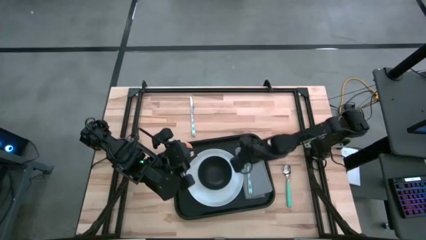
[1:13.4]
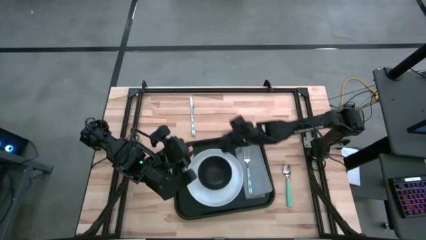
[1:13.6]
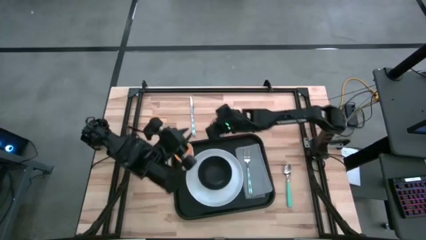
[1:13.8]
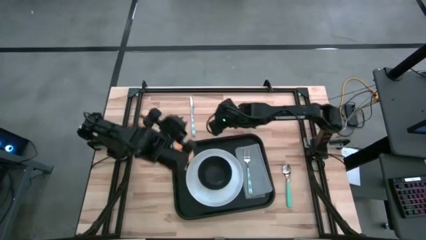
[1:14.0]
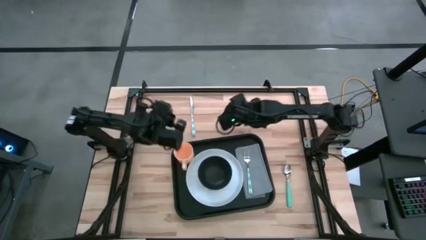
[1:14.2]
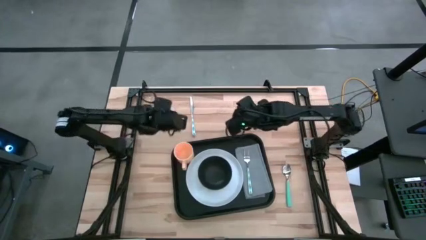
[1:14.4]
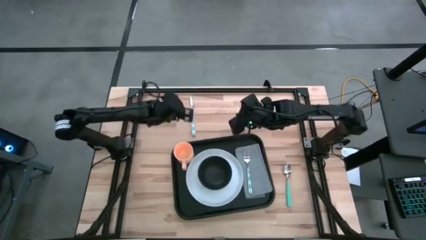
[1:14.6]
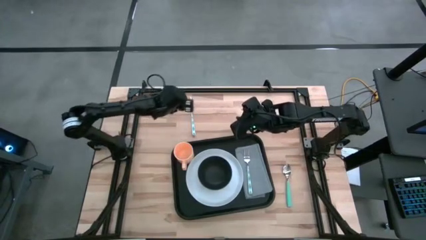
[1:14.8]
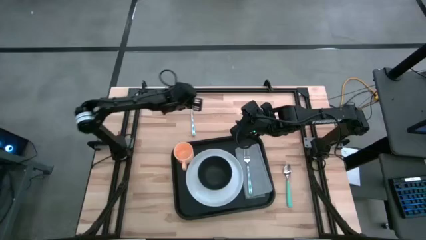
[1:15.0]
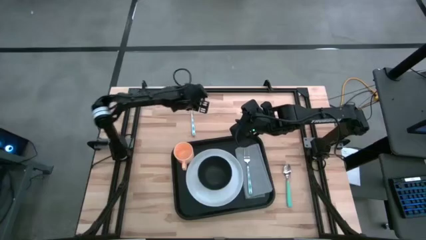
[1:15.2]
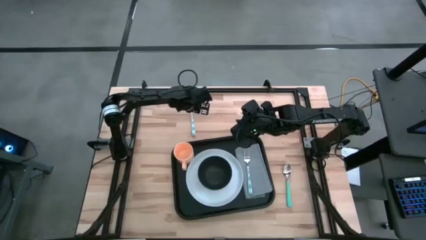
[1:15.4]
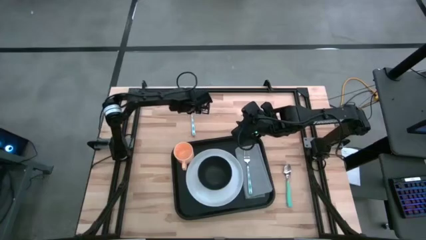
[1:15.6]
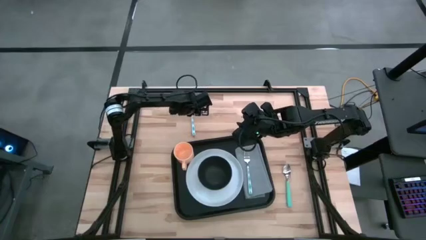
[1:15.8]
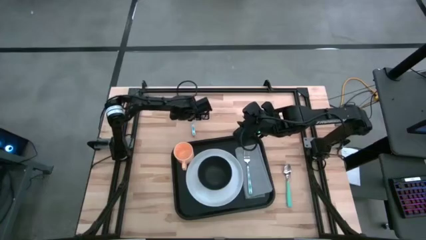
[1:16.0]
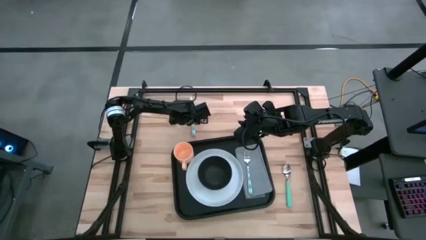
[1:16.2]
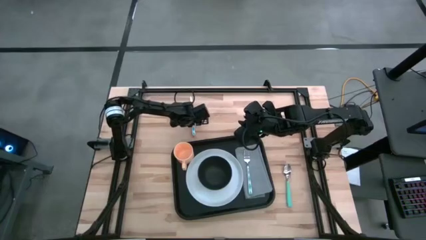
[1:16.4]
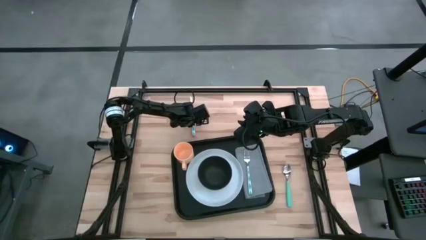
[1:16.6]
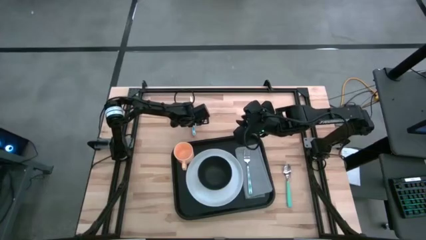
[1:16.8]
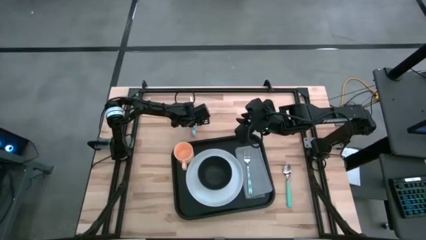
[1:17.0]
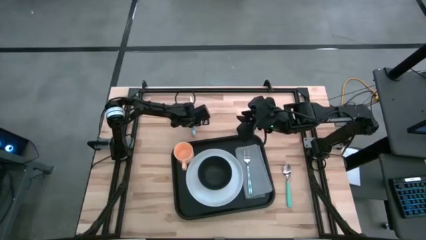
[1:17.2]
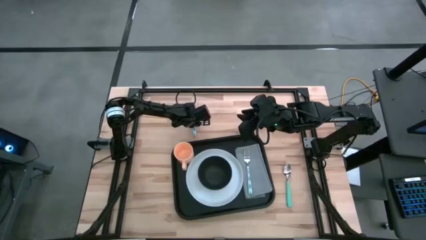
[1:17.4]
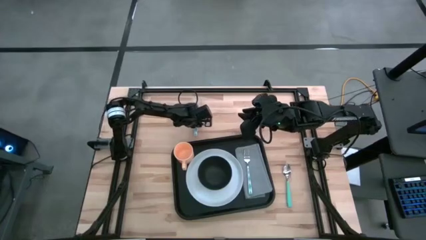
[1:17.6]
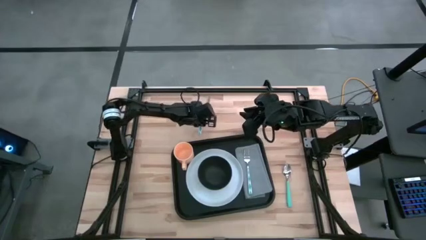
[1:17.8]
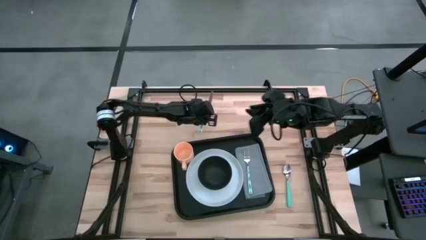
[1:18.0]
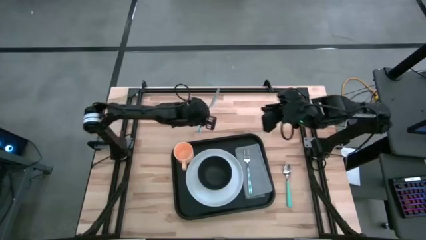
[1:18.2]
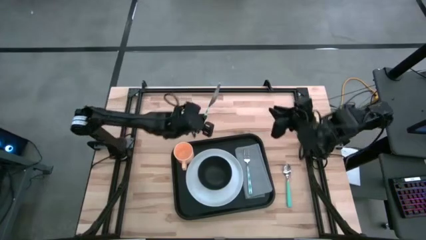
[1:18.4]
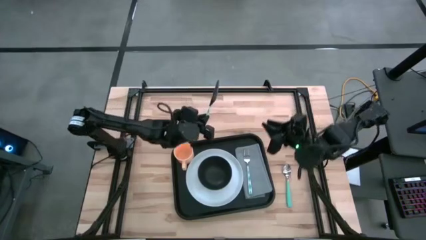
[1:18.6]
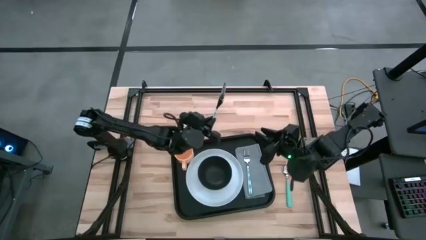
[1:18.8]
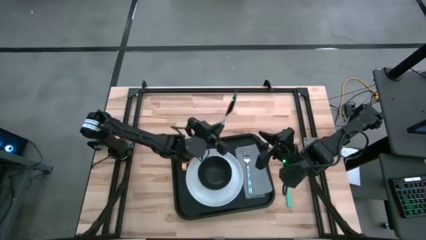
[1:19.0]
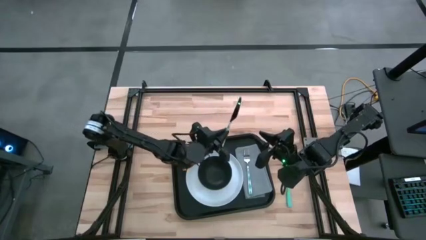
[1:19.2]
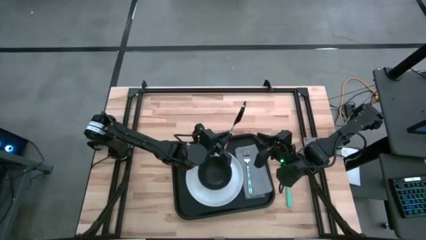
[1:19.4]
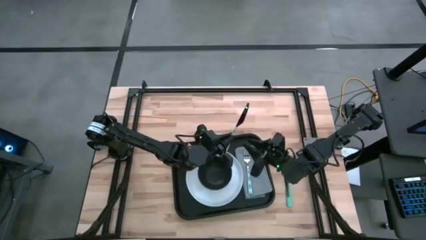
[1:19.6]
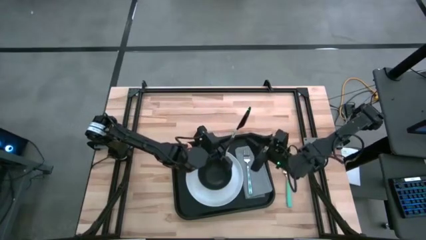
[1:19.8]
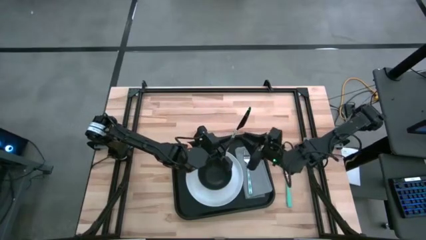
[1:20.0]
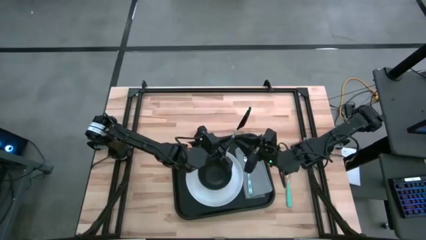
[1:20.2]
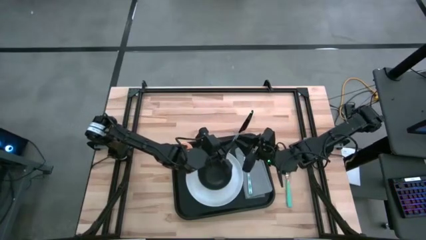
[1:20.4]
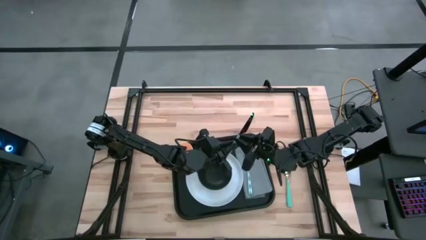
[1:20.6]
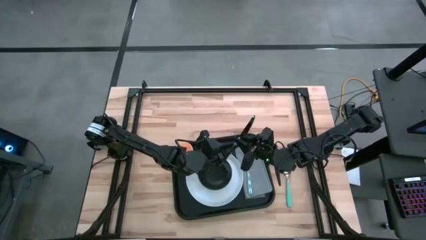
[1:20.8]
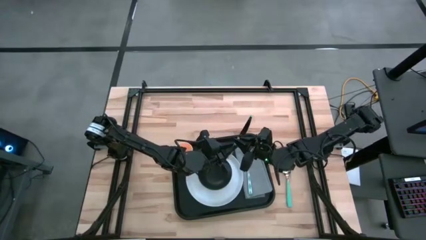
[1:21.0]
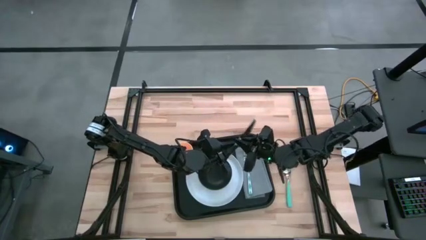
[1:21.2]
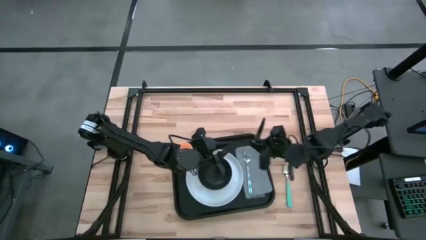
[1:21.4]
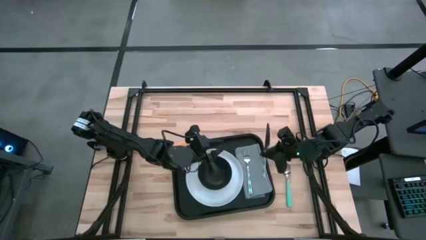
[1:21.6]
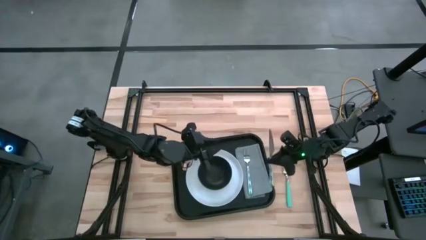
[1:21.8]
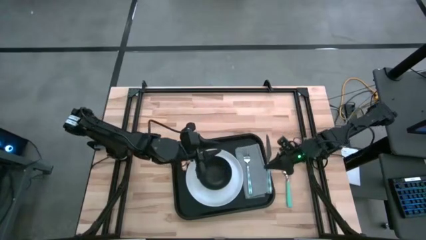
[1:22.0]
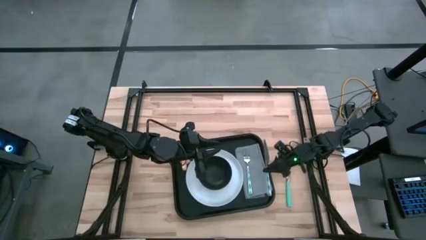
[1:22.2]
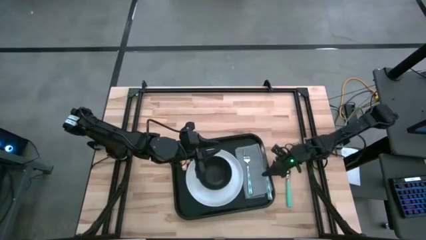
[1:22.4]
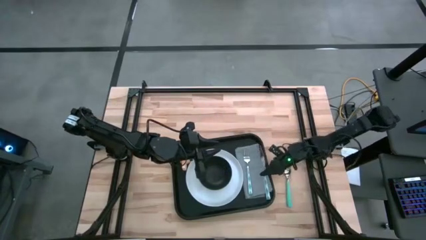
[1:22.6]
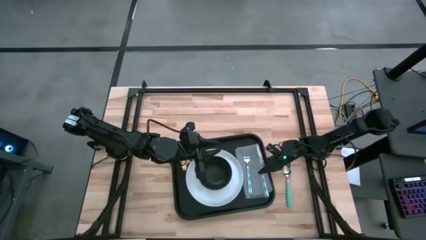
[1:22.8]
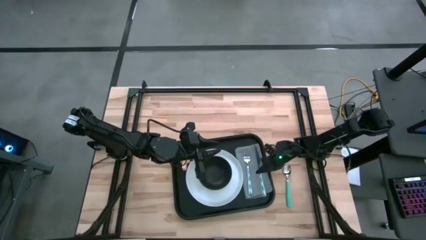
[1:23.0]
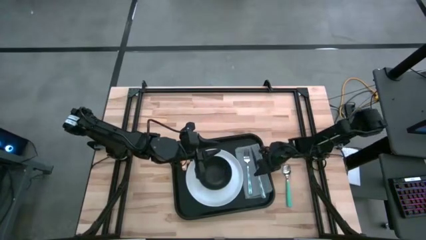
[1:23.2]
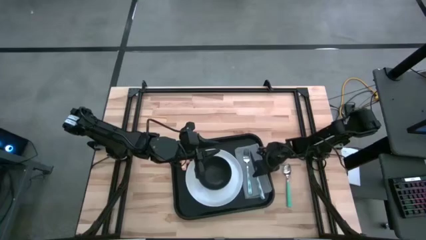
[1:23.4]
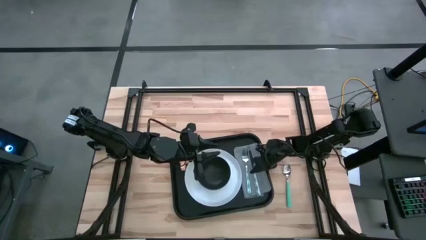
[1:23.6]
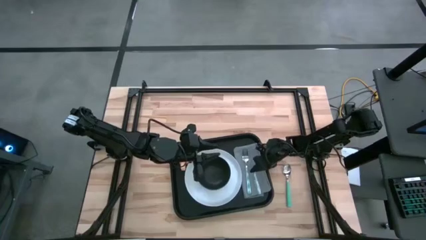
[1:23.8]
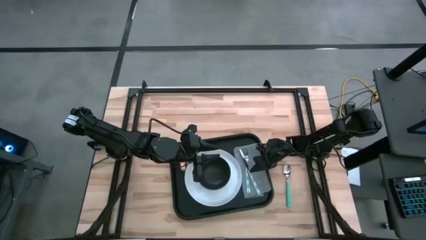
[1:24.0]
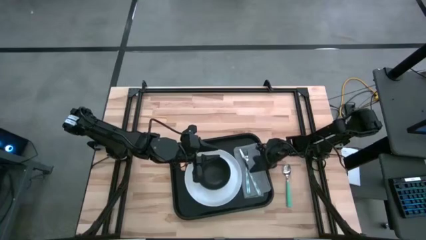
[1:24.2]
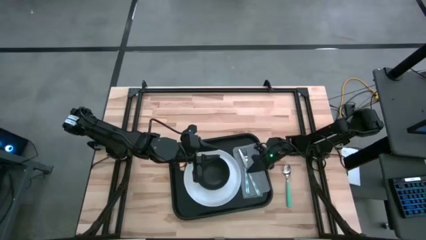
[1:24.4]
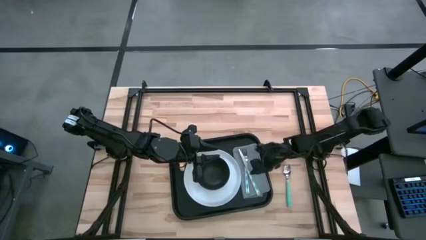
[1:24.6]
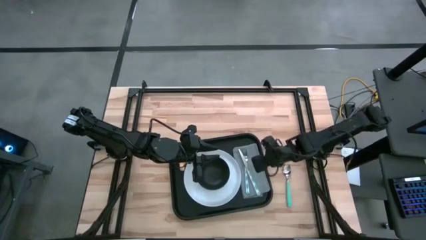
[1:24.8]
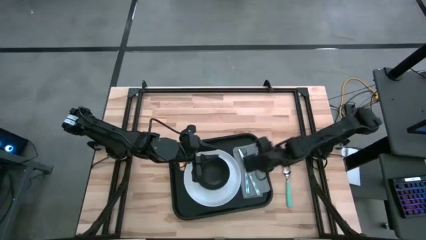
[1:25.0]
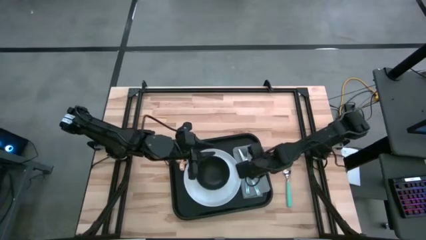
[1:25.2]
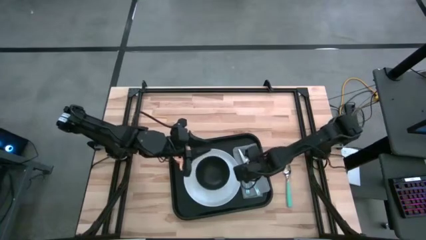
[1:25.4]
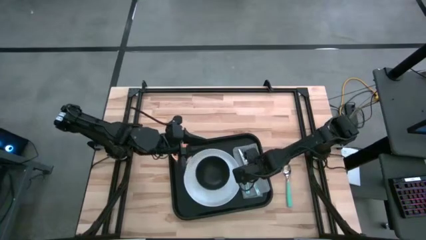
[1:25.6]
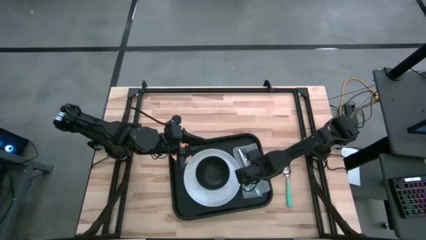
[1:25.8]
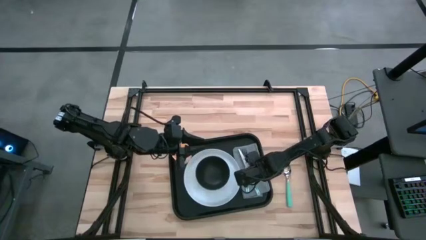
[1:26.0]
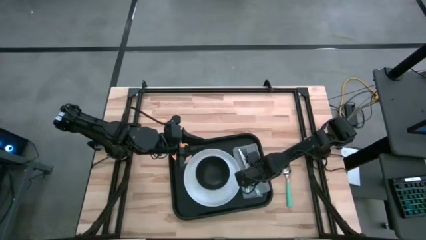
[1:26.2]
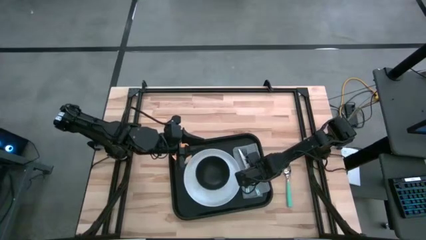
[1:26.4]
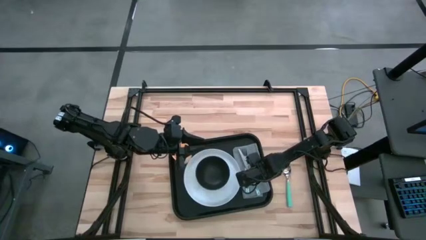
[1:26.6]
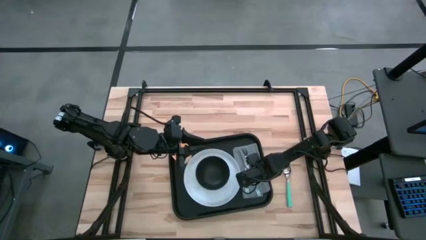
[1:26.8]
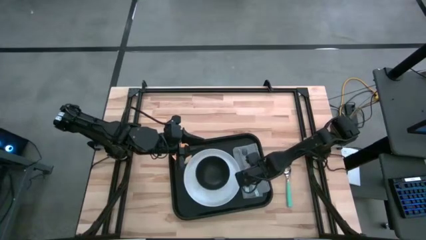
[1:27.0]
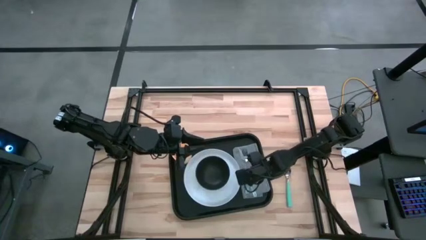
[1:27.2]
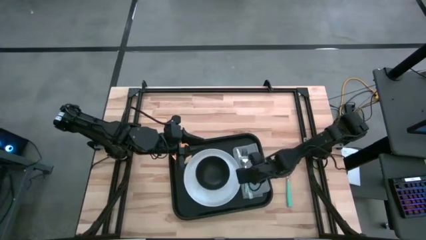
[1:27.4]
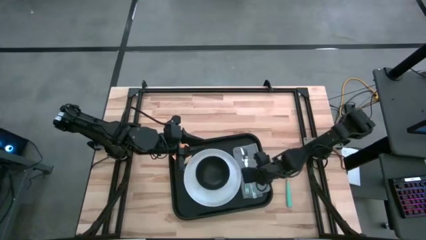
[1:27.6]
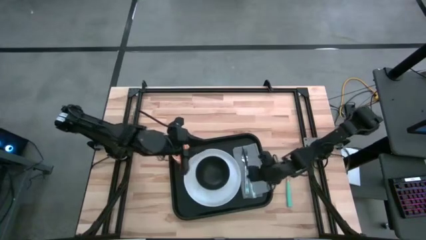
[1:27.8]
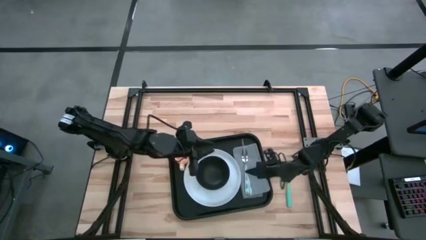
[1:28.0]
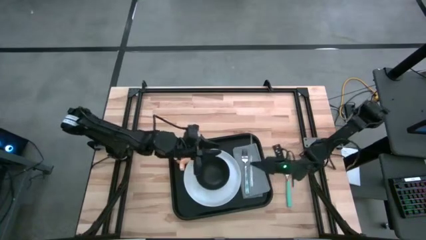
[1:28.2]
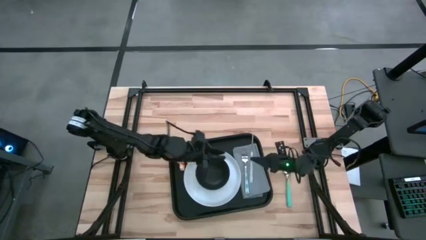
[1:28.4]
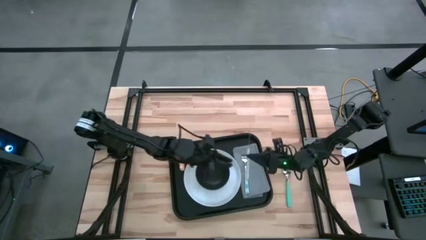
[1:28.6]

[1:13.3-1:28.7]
Task: Set up tray
Put the blue butter knife on the gray napkin to the right side of the blue fork

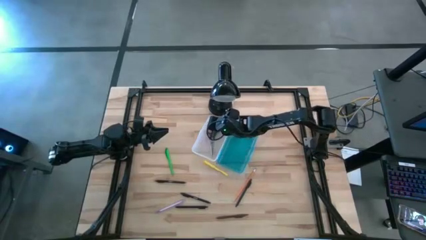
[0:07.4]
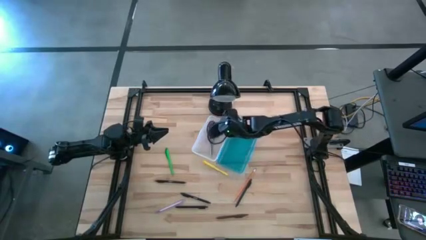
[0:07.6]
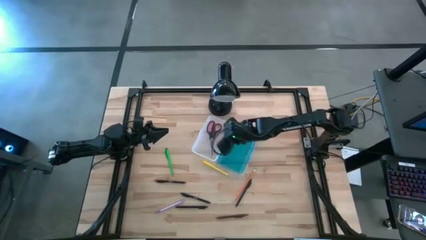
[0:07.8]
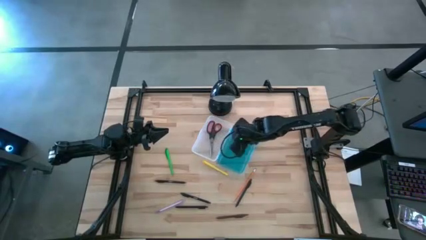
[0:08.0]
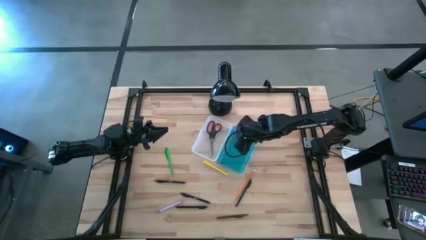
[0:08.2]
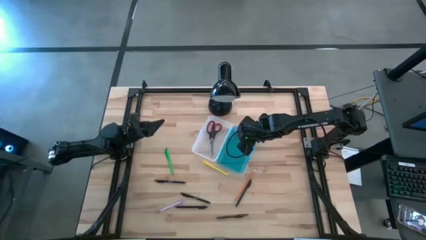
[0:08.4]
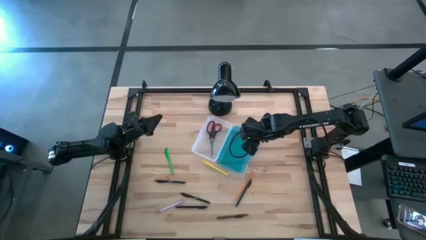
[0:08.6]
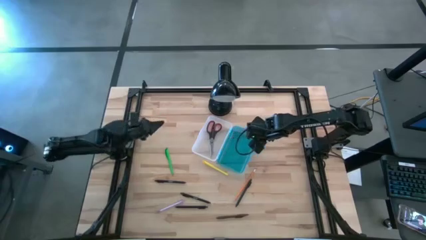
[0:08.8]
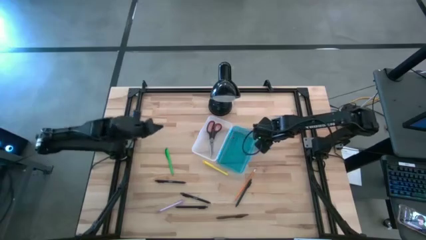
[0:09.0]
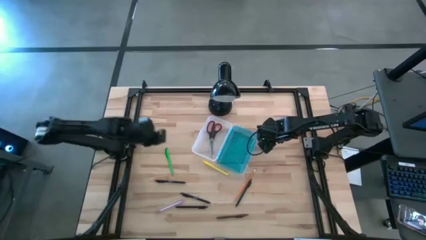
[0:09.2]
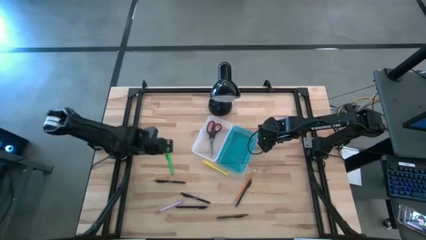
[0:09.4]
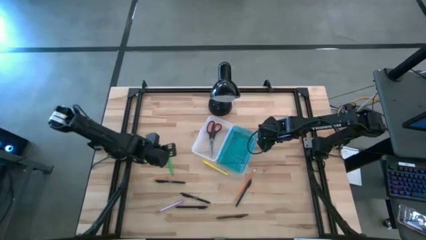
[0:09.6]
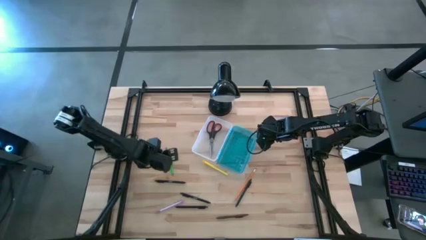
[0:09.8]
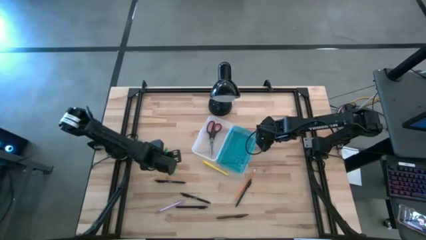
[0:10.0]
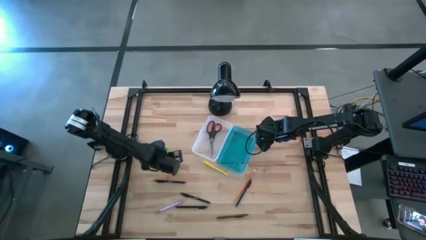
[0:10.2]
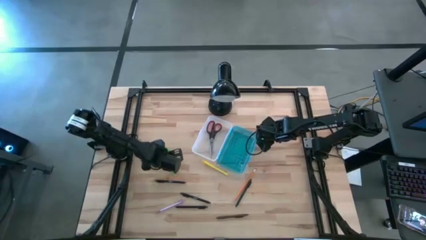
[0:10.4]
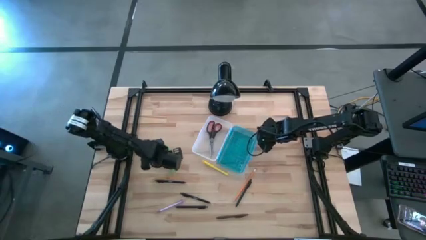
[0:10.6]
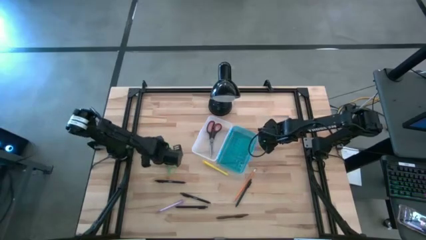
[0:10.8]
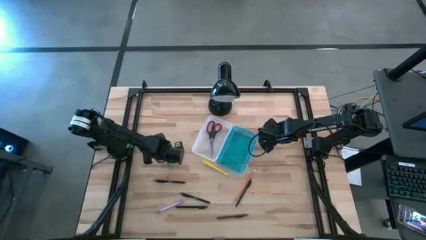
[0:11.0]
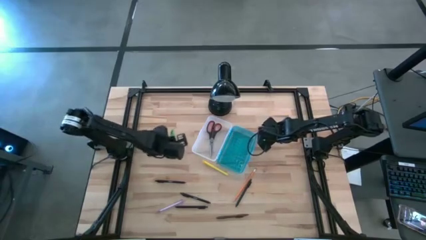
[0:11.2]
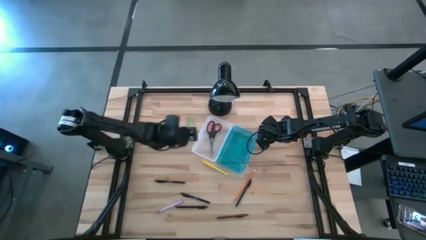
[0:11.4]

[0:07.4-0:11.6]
Task: Pick & place school supplies into a supply box
Put the green pen into the supply box
